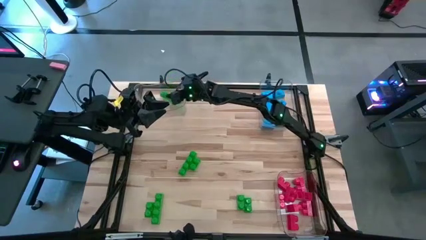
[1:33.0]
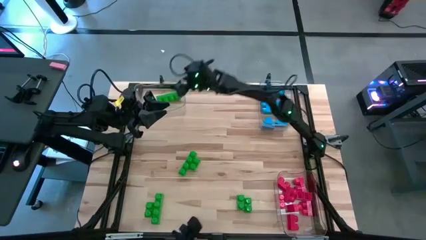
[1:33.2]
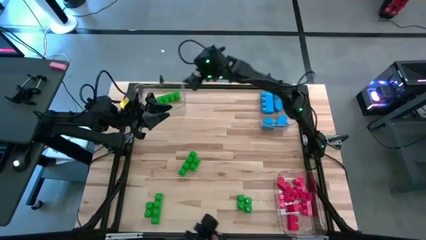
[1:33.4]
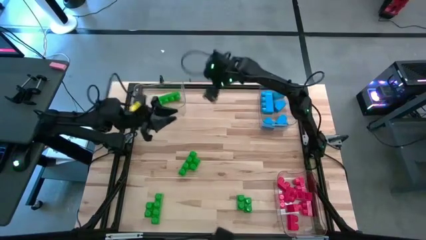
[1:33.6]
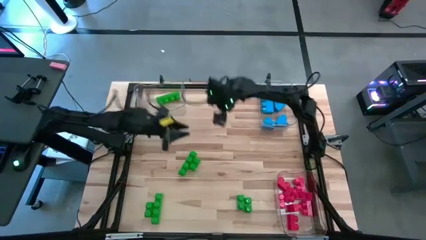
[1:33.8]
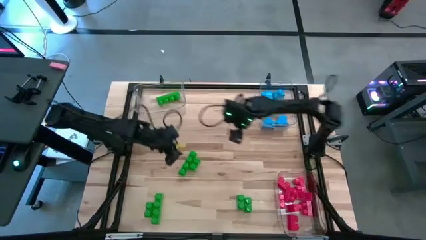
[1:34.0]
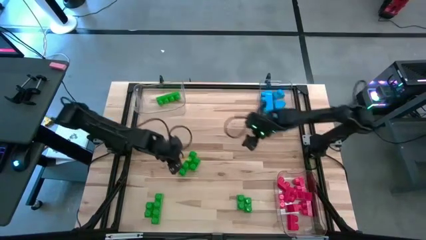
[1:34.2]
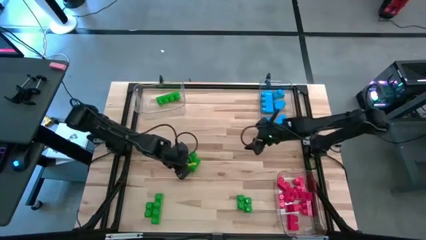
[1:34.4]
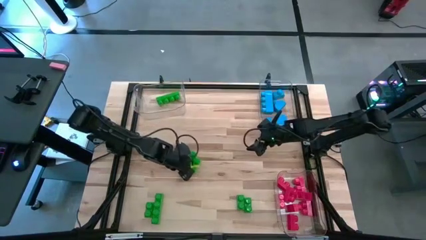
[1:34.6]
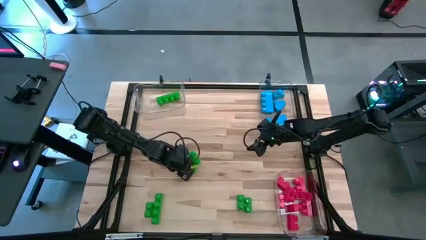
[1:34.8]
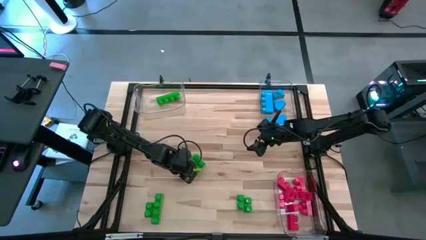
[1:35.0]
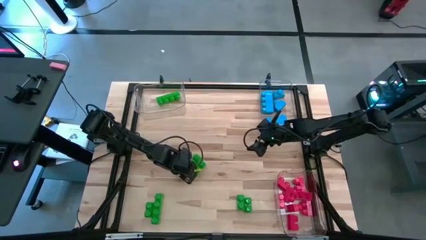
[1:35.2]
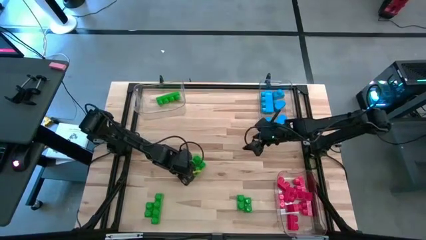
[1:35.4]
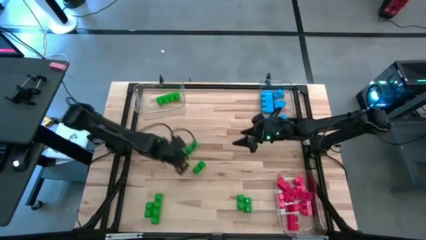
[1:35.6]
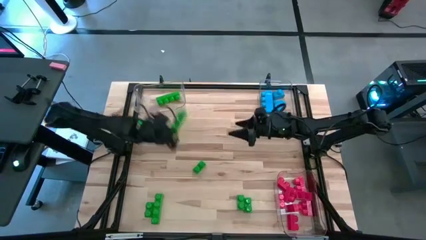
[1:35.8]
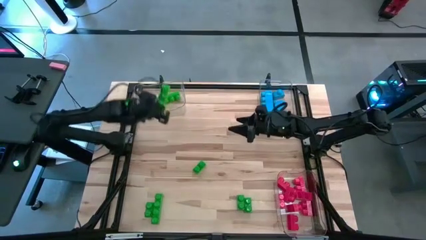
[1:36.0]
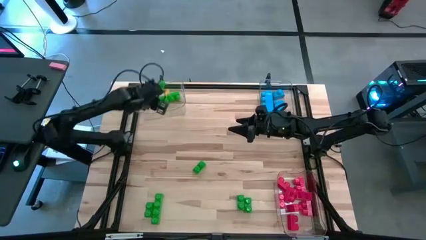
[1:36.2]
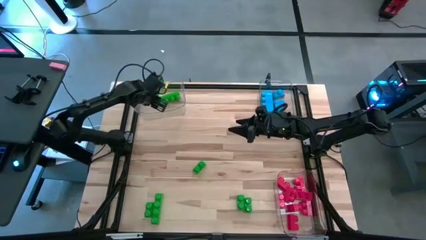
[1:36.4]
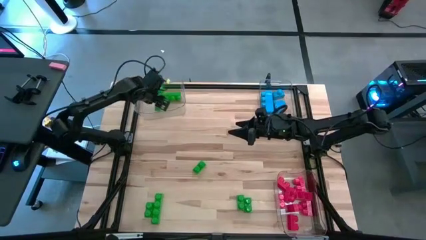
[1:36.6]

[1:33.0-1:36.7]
Task: Sort blocks
Put the green game piece into the top left transparent bin

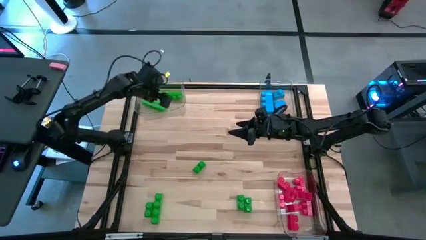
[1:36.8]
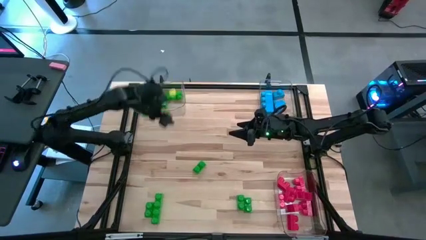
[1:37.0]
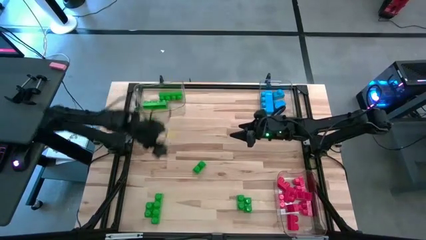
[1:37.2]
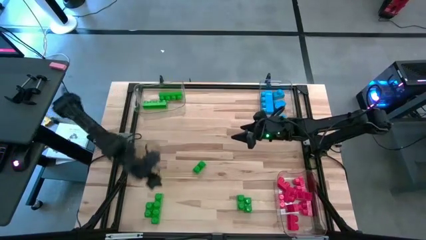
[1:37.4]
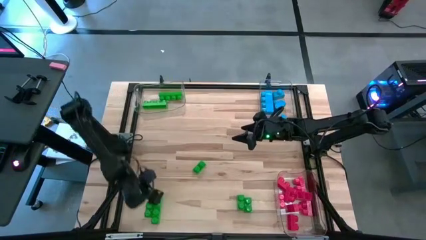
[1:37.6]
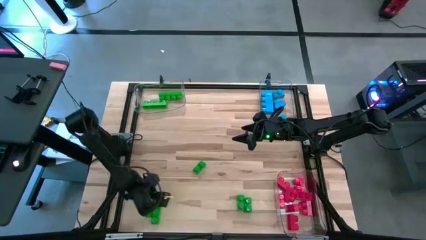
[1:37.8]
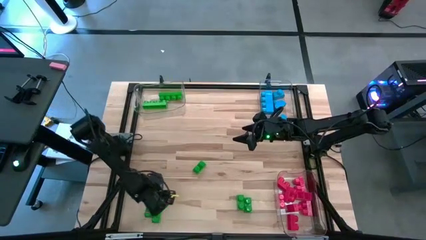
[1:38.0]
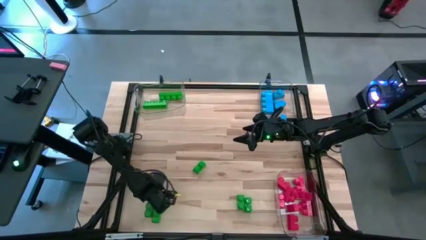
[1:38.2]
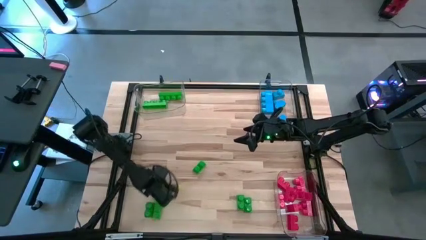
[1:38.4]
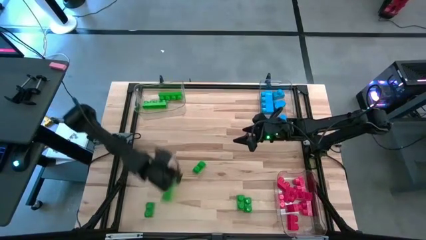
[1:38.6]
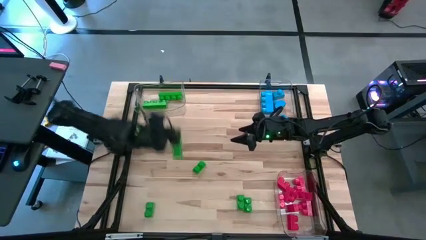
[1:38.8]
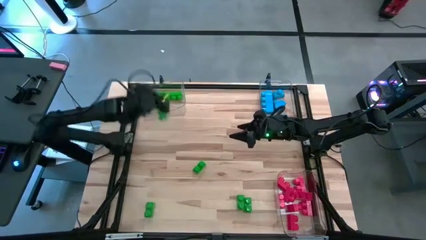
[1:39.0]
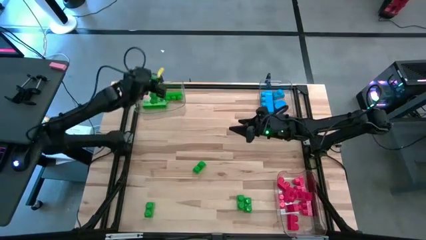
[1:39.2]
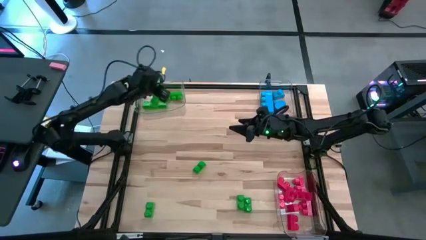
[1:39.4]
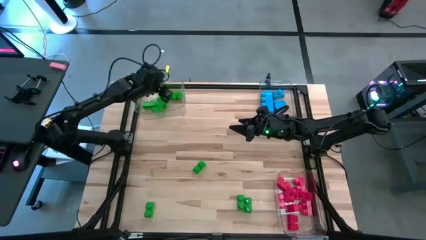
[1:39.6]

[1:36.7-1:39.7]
Put the green game piece into the top left transparent bin

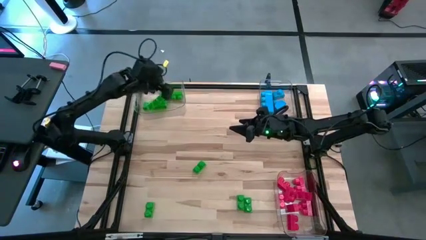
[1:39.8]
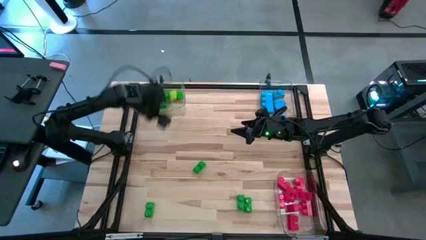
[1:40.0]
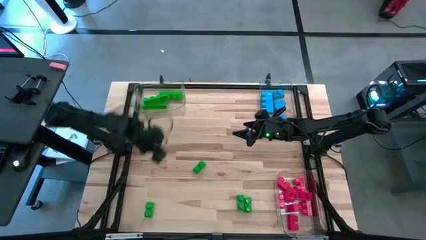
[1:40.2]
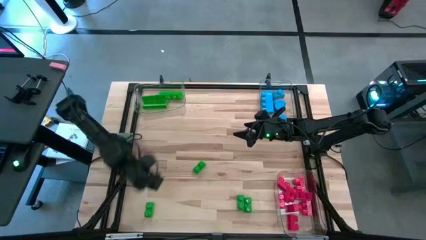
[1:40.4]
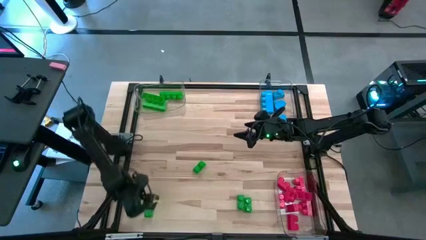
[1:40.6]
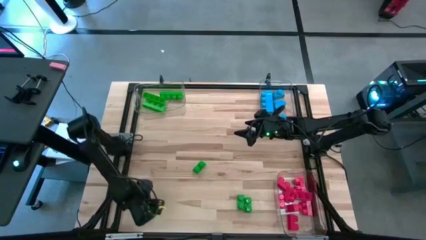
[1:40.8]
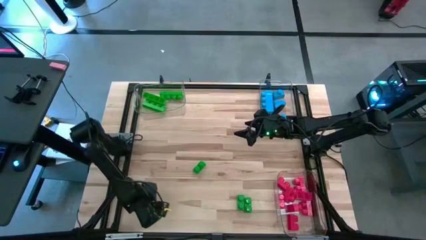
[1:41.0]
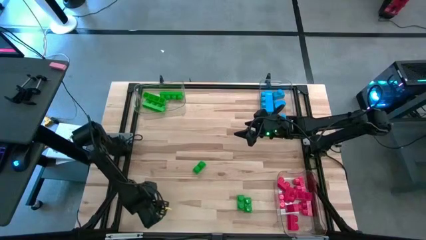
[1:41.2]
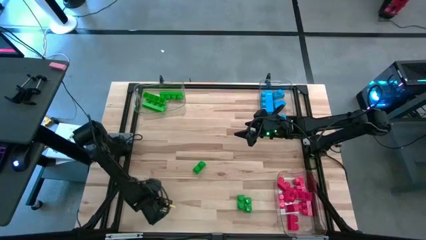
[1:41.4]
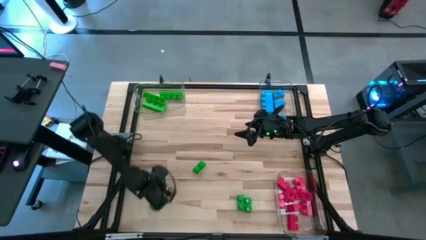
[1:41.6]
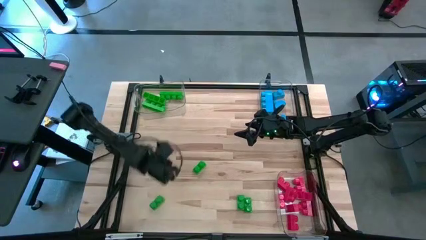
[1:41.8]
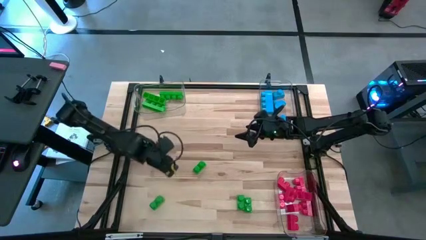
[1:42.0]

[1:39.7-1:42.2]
Put the green game piece into the top left transparent bin

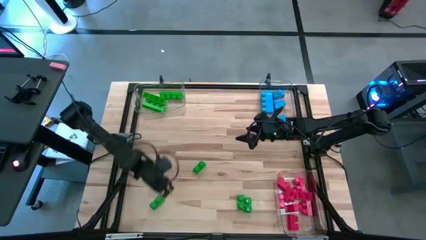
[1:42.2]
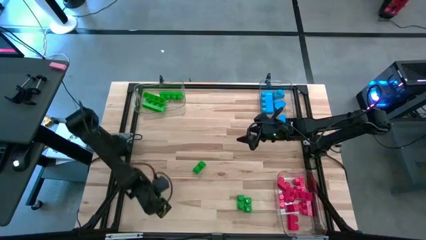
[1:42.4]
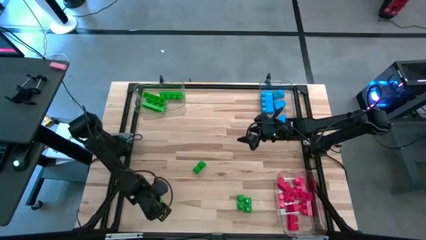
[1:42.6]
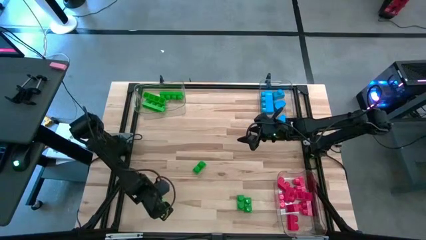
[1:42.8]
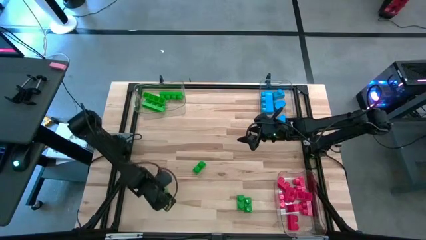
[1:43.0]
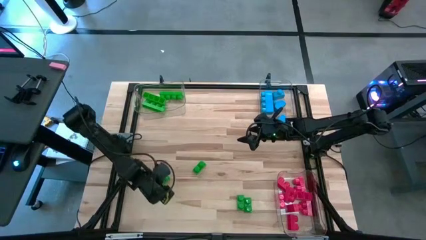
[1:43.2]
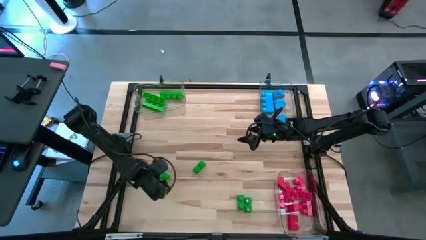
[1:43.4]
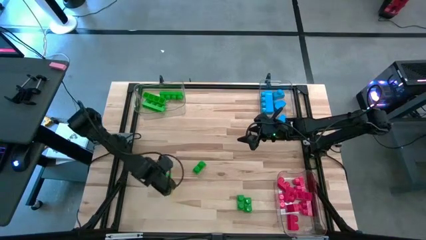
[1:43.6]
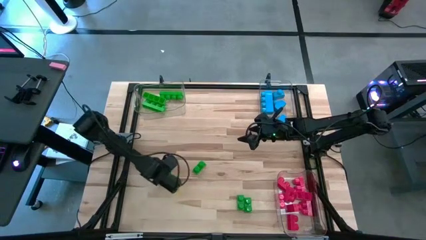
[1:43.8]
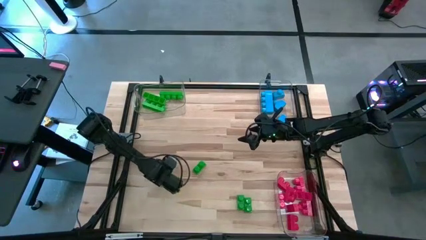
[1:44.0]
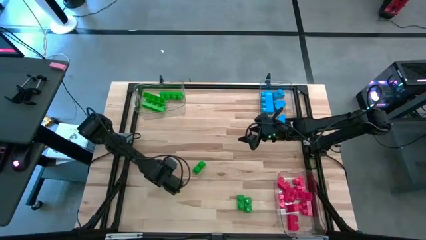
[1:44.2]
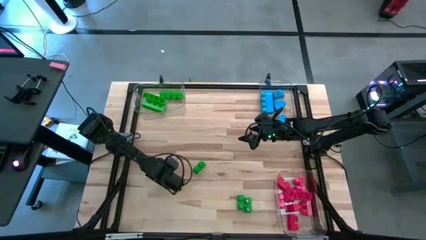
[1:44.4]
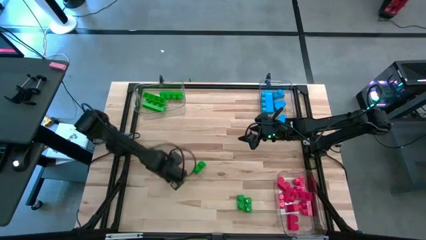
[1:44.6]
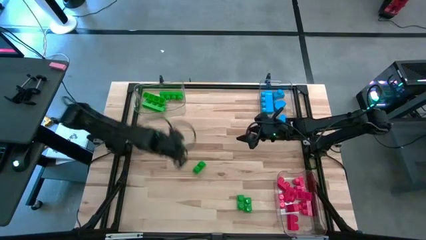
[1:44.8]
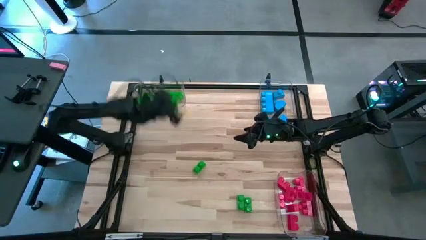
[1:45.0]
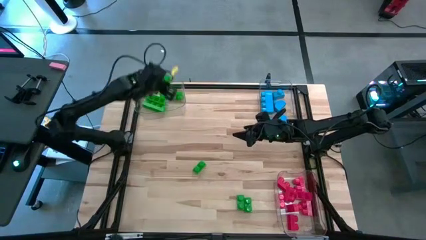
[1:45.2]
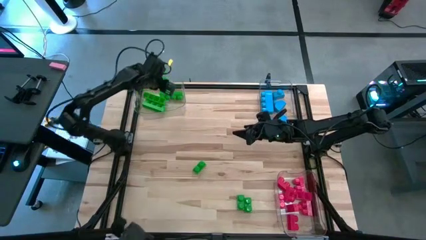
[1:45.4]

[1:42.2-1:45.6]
Put the green game piece into the top left transparent bin

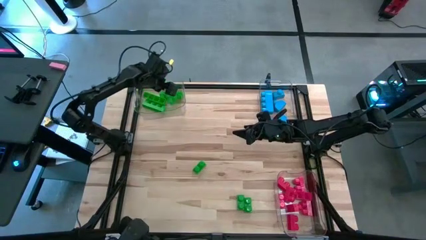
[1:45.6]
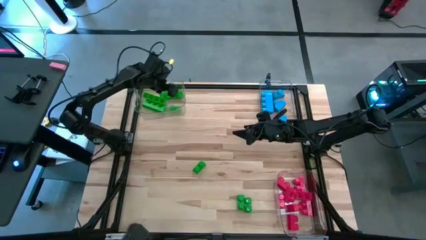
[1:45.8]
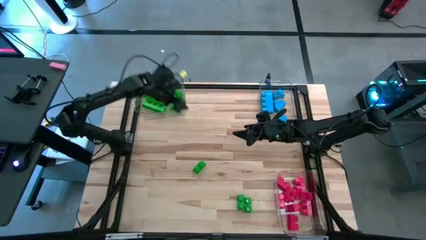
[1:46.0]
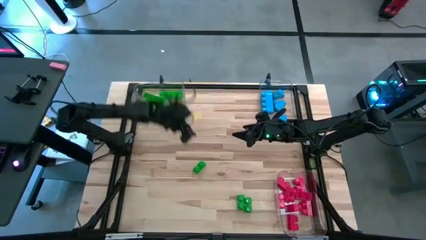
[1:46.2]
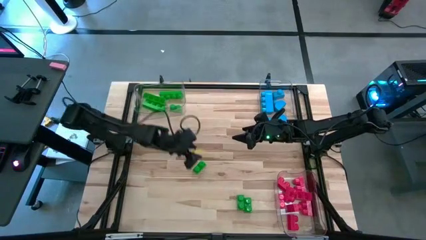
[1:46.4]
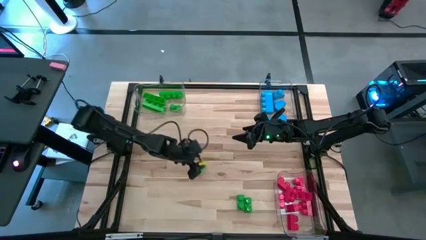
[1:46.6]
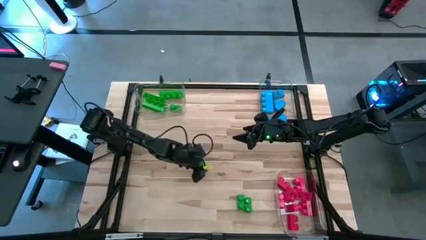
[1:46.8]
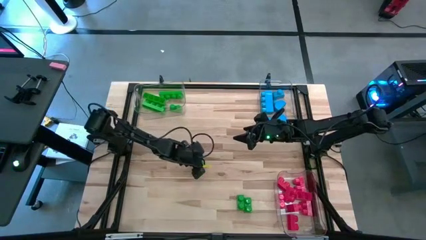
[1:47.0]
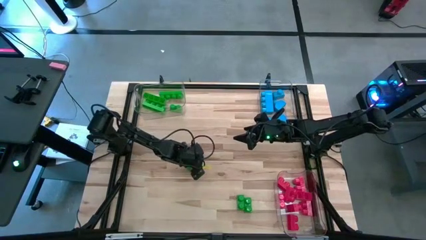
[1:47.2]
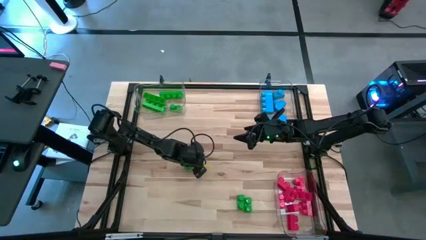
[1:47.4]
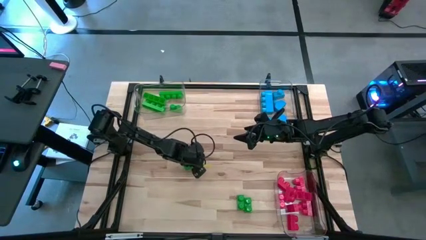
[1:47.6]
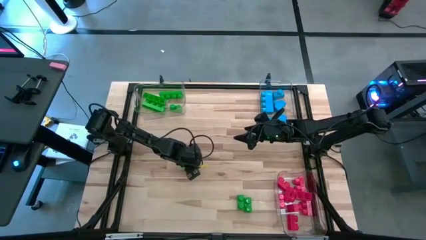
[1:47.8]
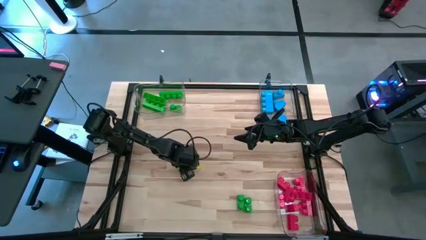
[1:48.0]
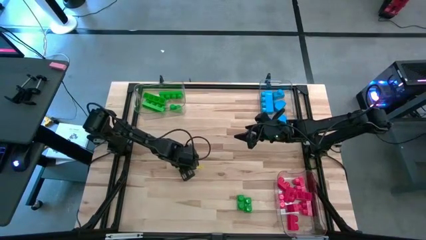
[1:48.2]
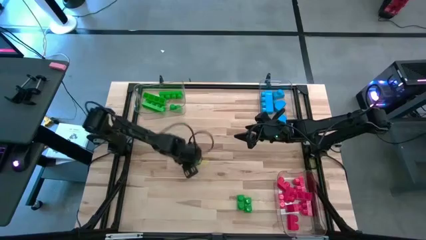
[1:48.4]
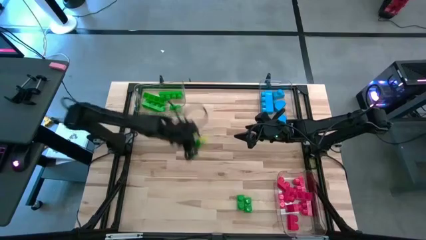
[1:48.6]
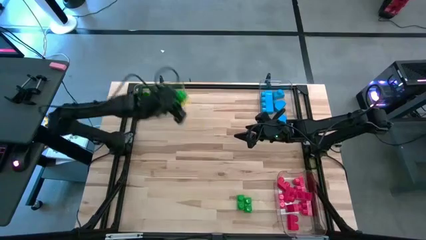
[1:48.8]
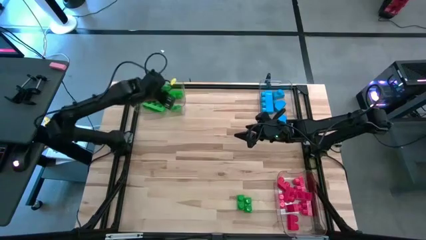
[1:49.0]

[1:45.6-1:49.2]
Put the green game piece into the top left transparent bin
